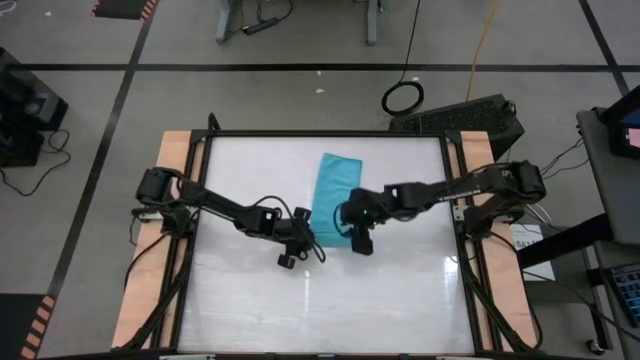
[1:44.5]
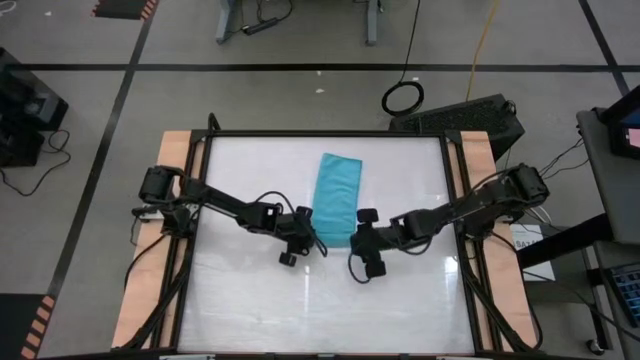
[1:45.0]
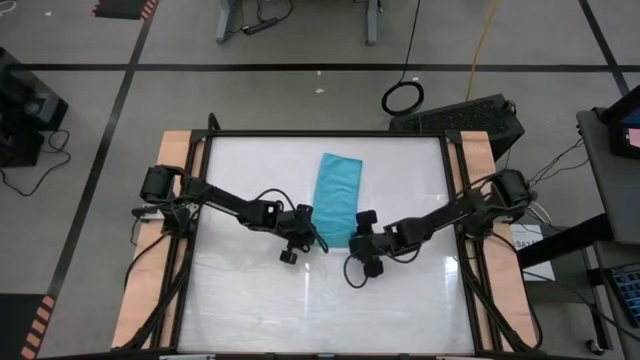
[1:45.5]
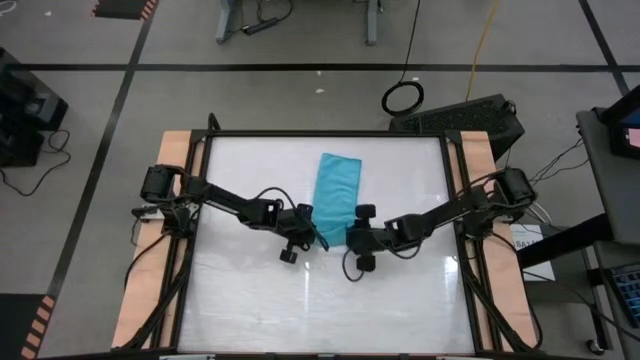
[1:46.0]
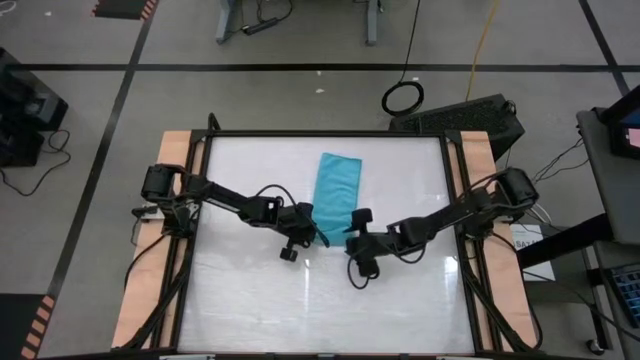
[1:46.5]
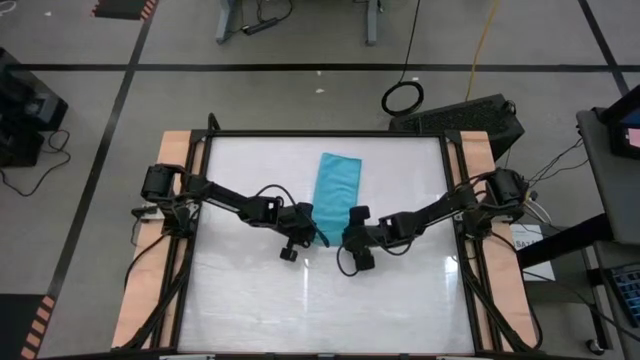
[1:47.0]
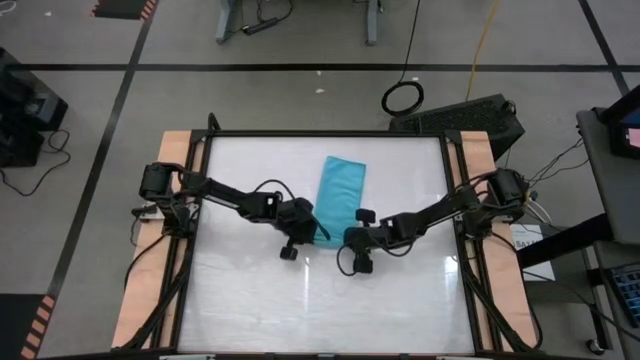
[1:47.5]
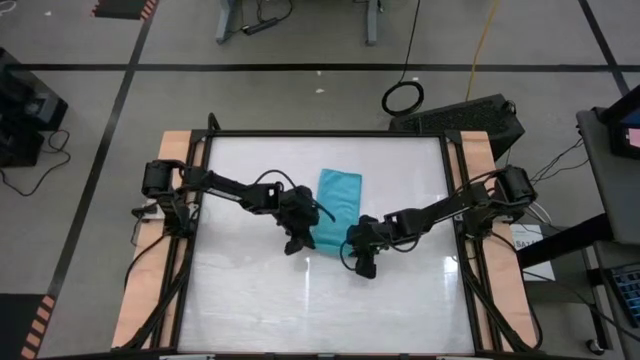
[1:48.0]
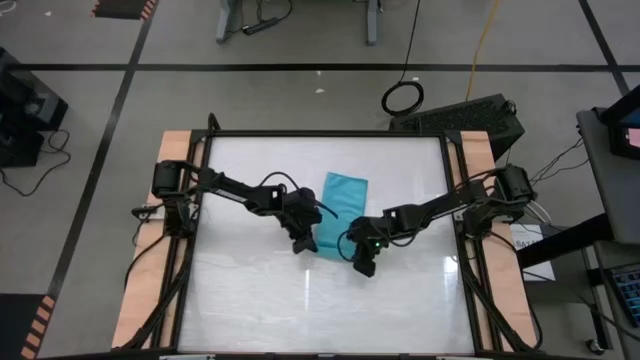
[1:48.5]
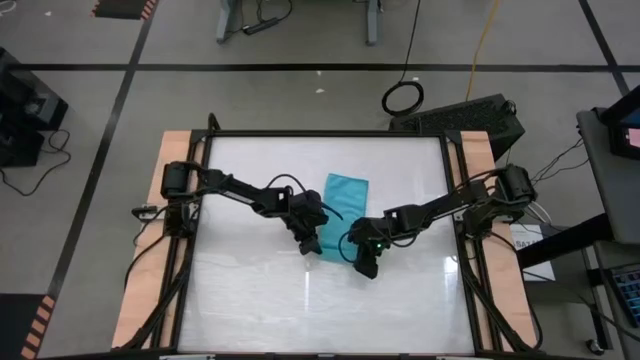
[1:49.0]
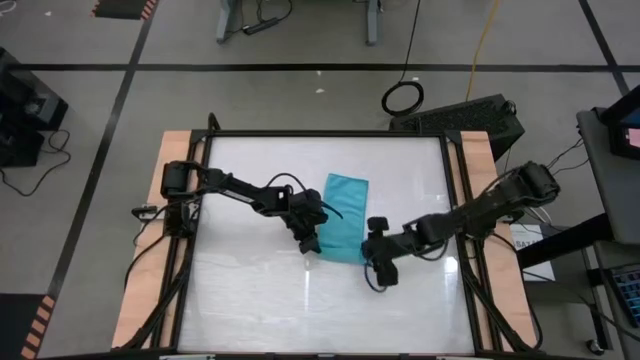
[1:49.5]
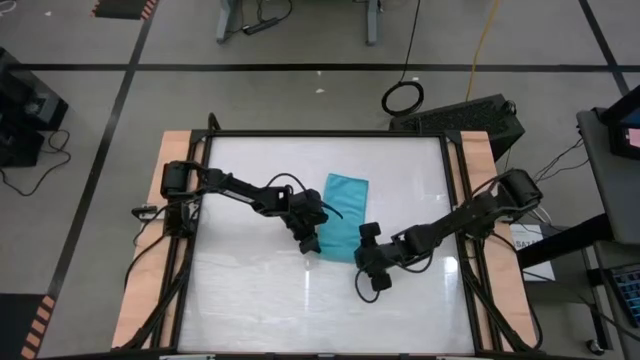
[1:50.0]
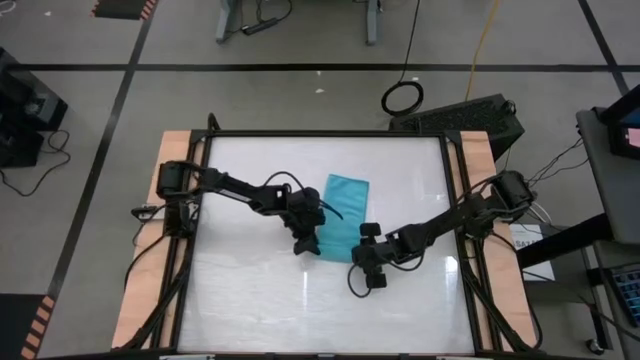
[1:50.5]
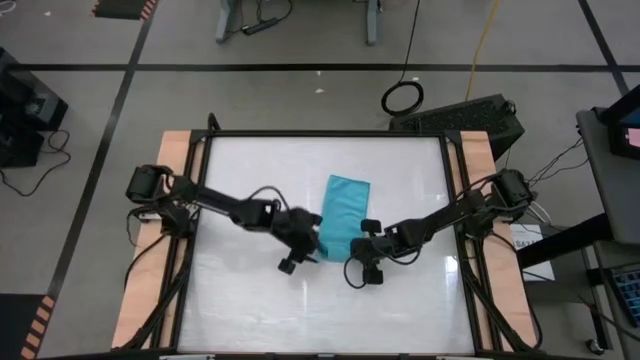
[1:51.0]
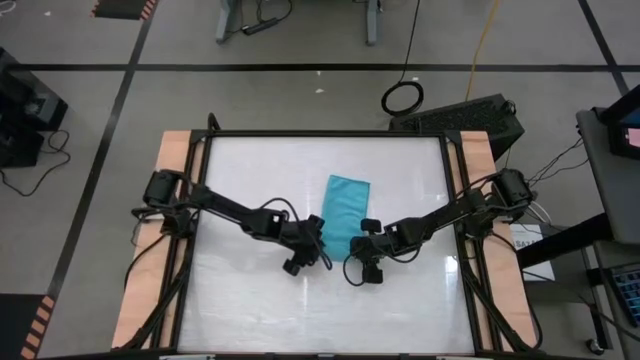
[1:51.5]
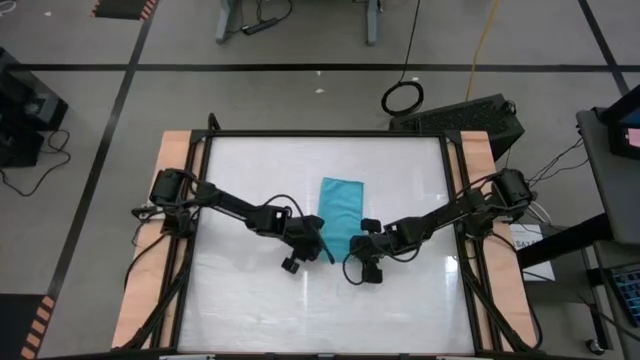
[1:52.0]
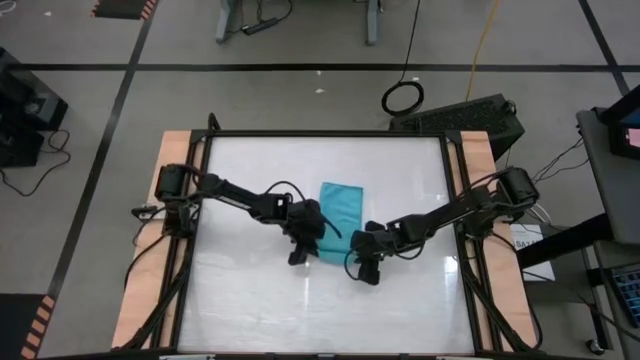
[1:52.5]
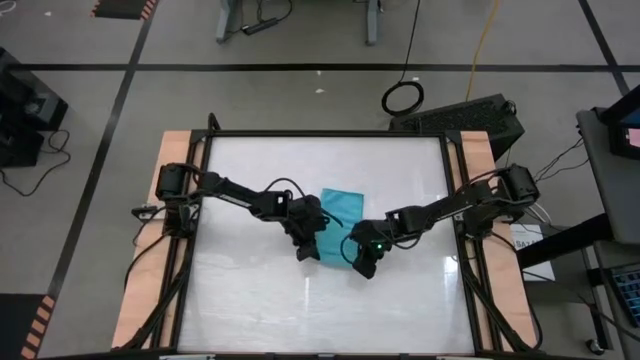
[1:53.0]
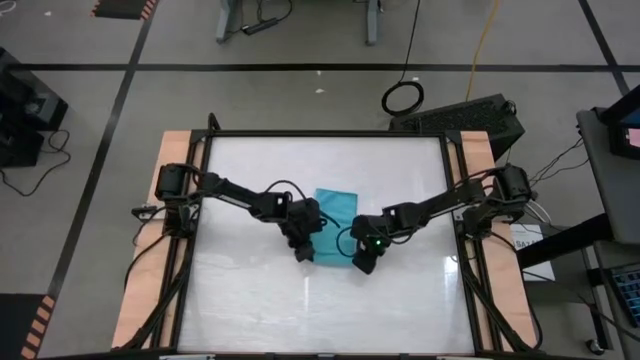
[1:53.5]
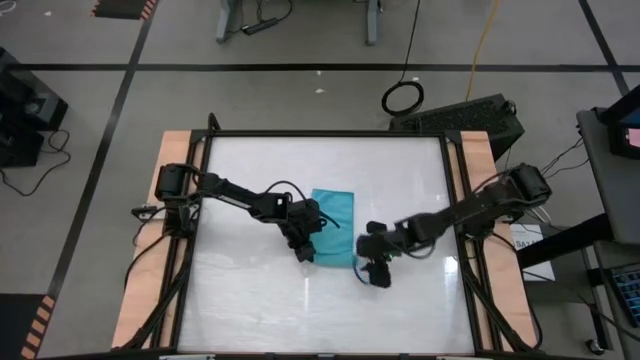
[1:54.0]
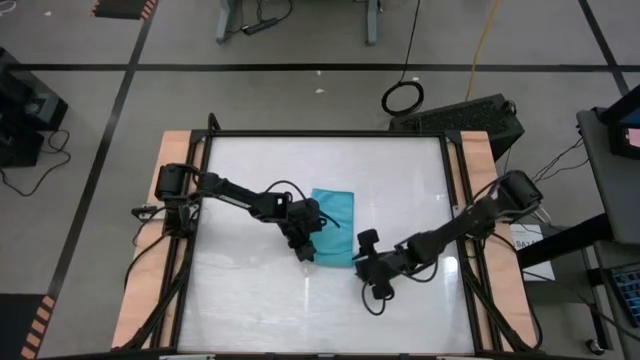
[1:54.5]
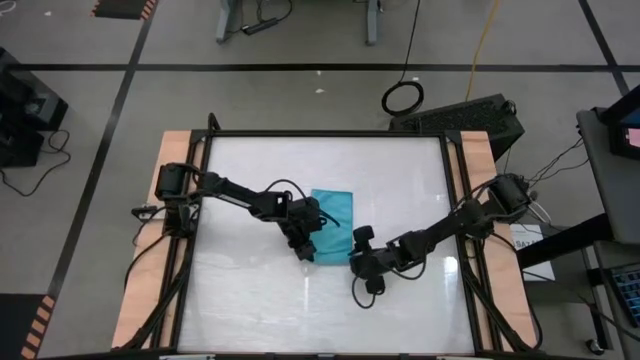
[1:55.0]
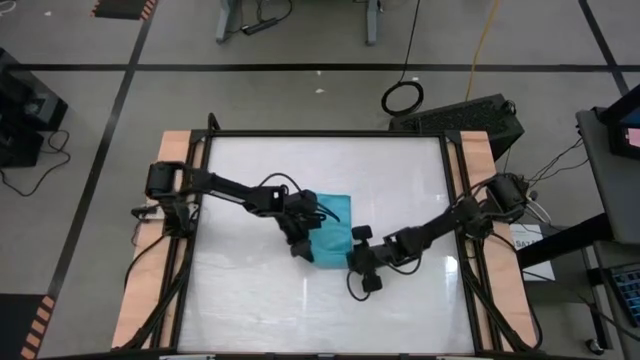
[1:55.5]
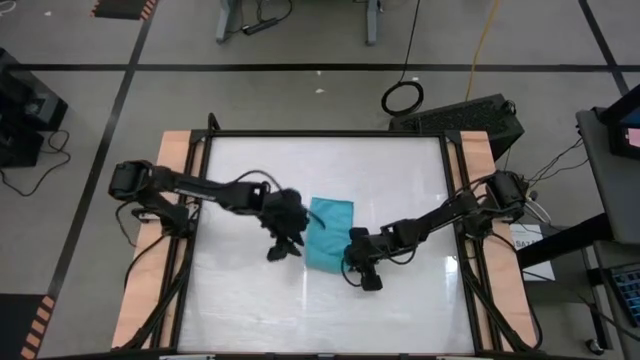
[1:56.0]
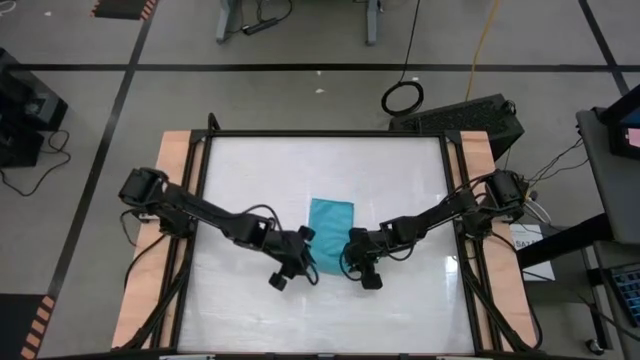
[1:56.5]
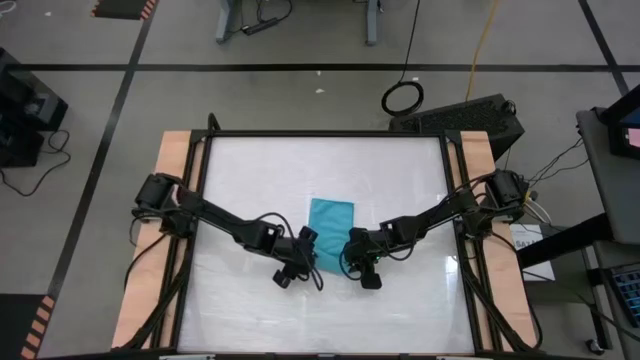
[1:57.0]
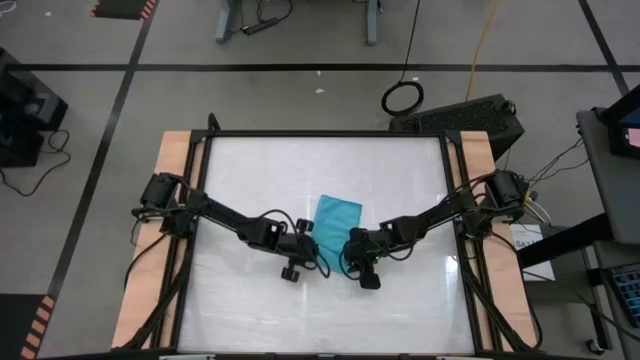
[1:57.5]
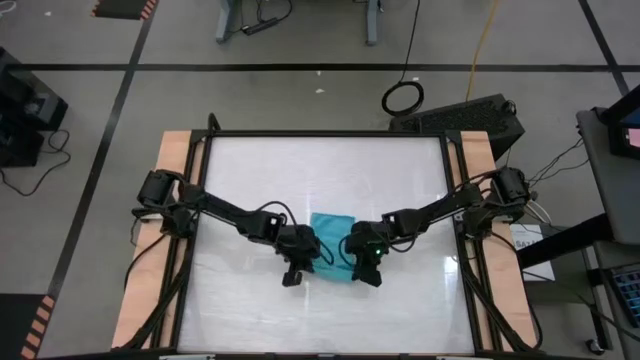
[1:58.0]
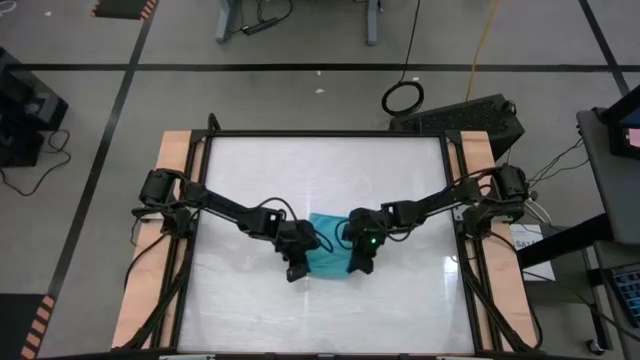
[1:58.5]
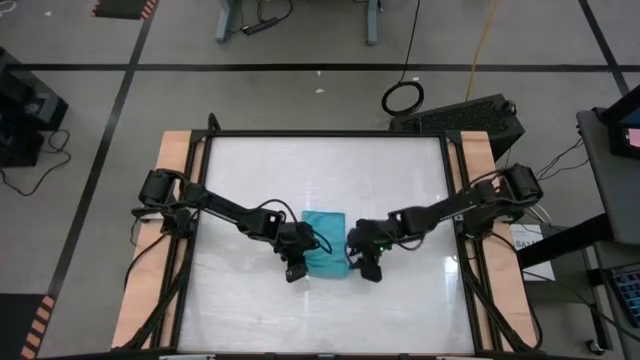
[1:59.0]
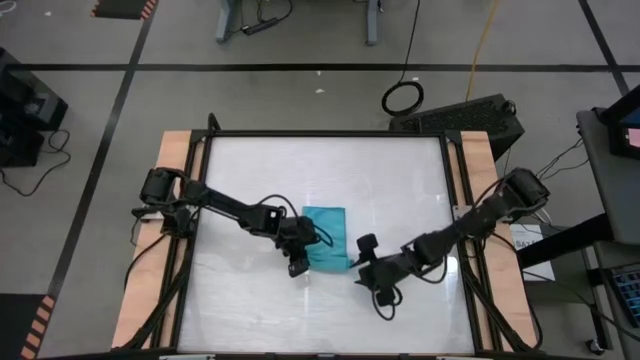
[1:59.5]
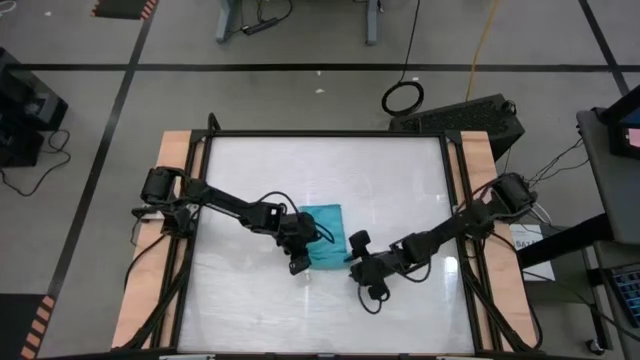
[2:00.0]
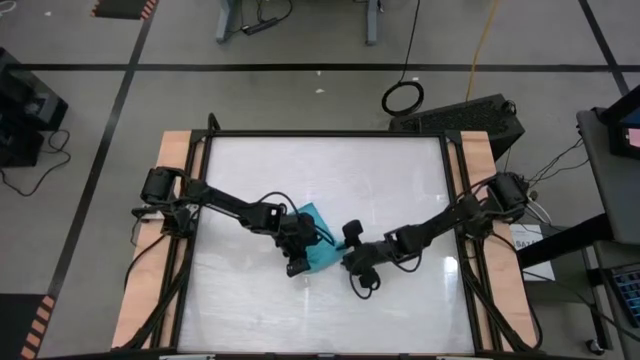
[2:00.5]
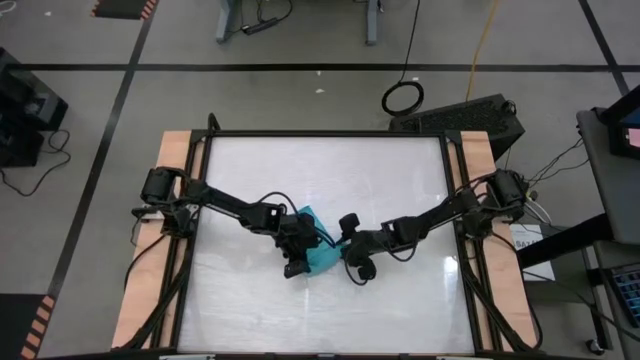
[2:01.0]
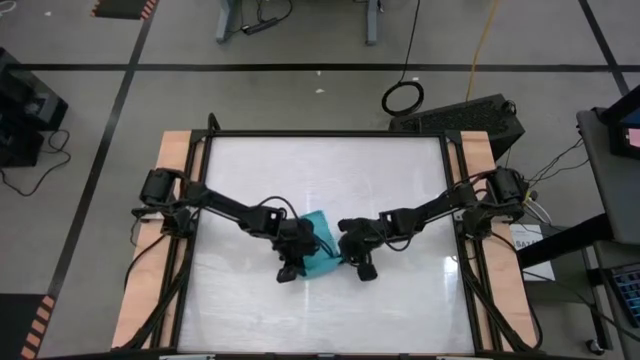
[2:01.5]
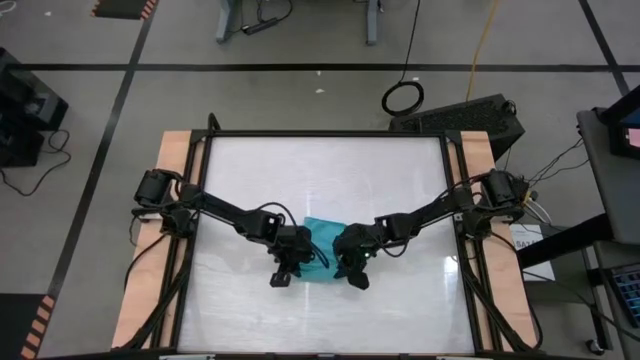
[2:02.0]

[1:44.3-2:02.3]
Task: Roll towel
Roll the blue microfiber towel

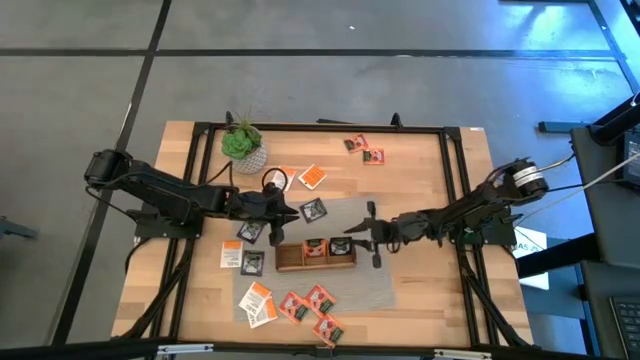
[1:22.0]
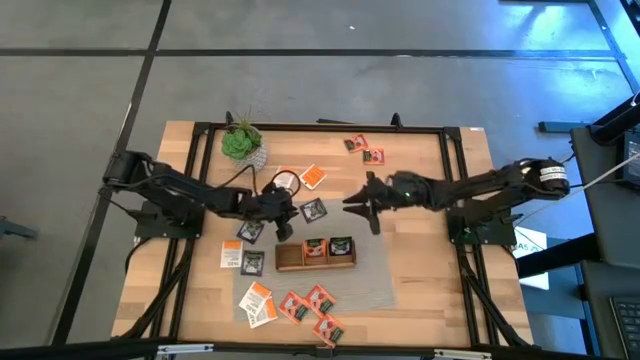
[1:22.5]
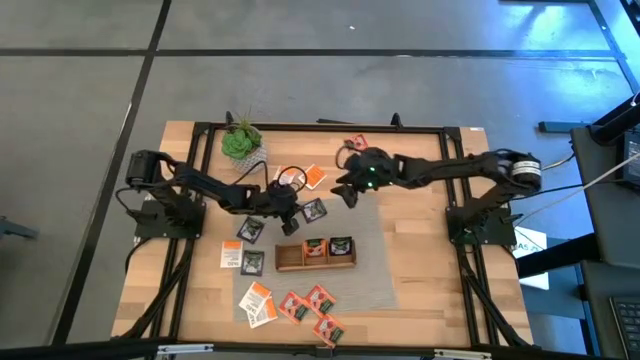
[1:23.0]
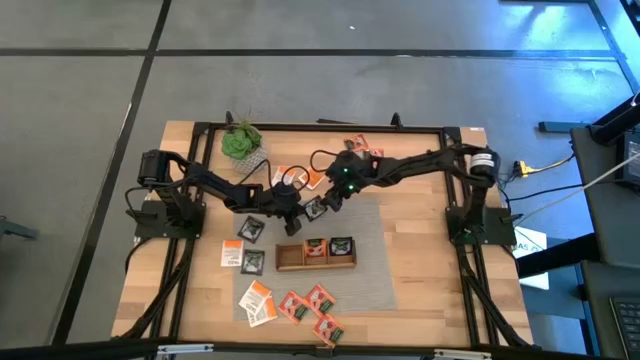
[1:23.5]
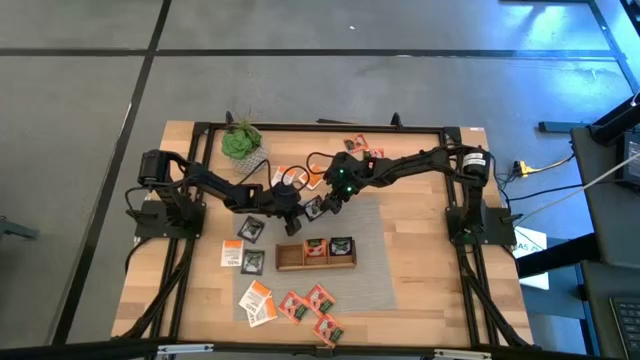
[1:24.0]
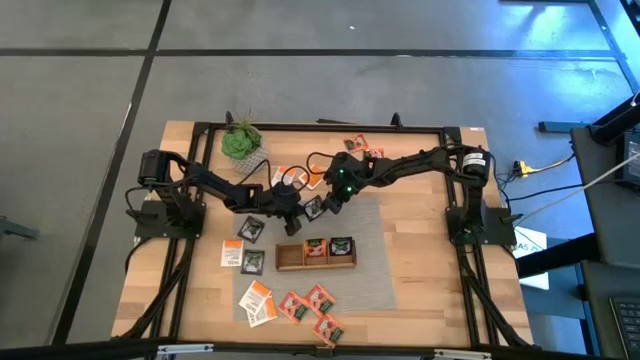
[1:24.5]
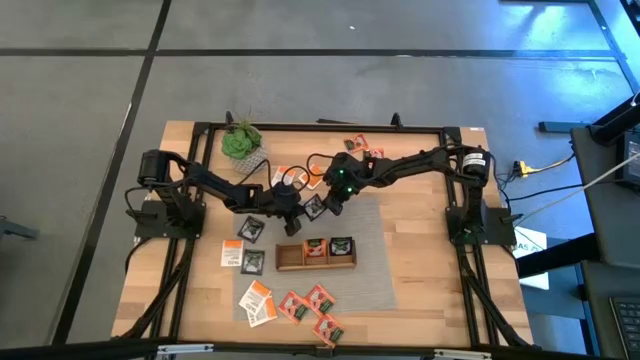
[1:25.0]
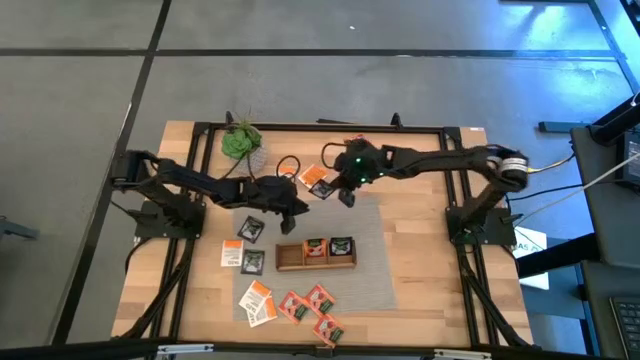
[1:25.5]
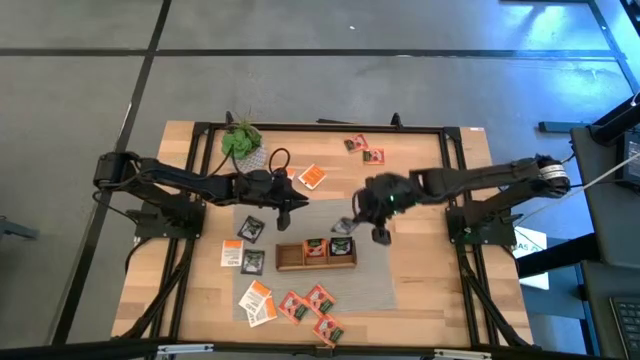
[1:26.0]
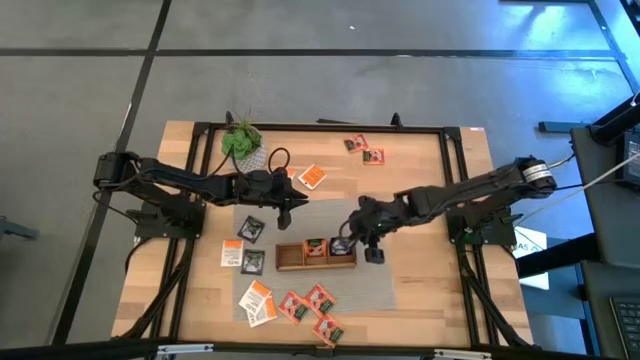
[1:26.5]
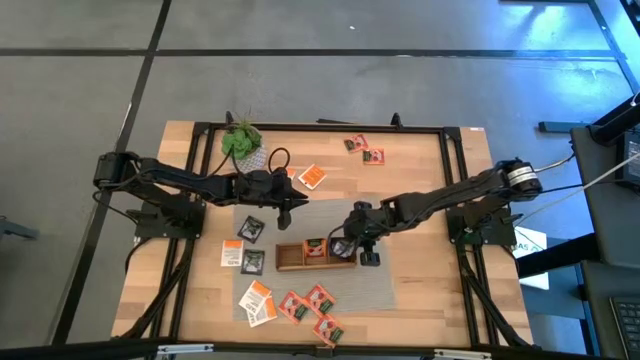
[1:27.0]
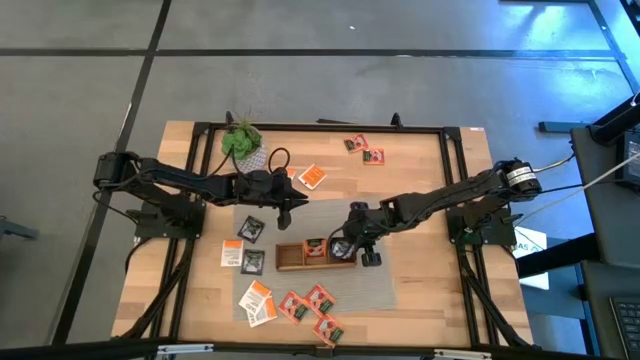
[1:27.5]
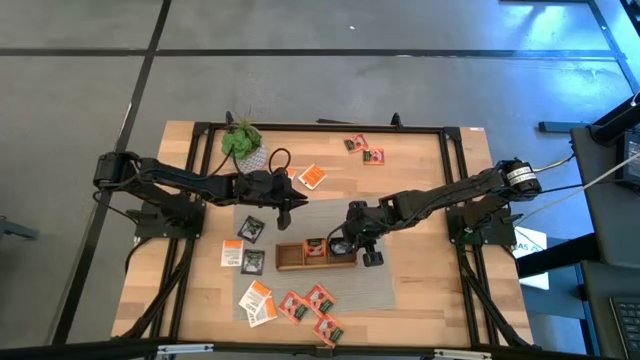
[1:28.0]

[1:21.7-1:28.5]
Task: Pick & Place Tea
Put the purple tea bag into the right section of the wooden organizer
